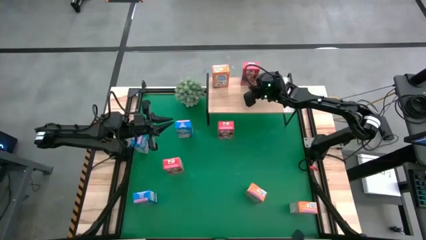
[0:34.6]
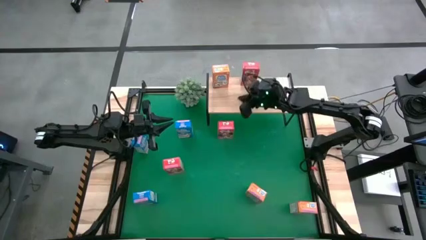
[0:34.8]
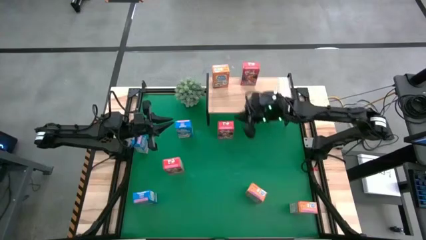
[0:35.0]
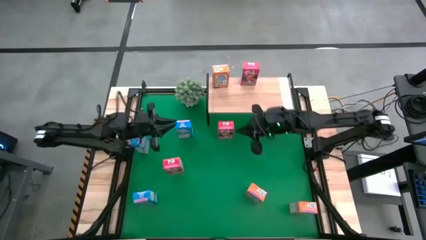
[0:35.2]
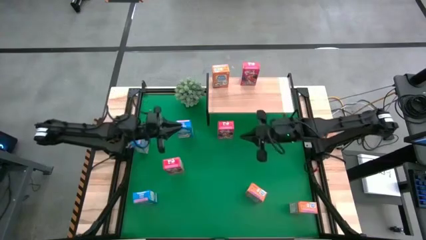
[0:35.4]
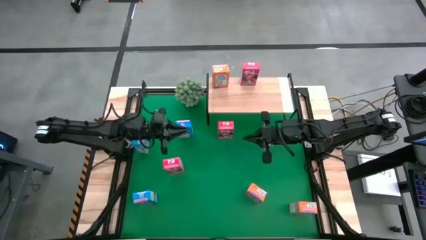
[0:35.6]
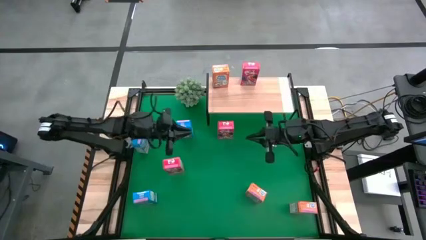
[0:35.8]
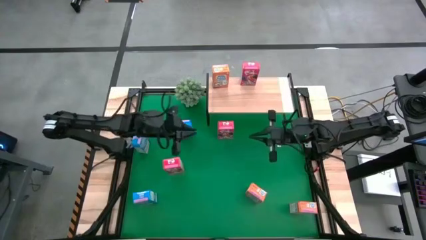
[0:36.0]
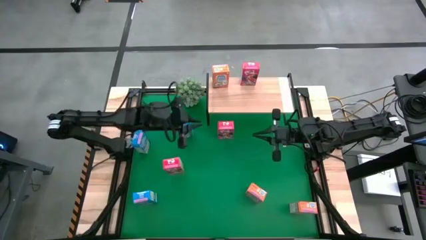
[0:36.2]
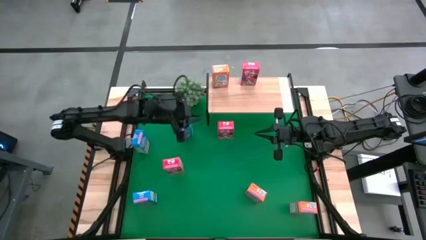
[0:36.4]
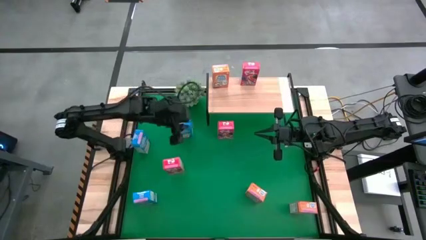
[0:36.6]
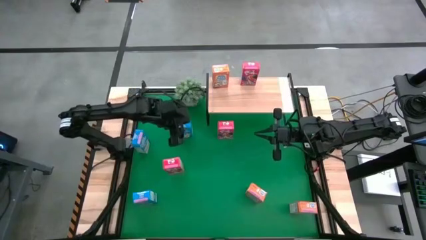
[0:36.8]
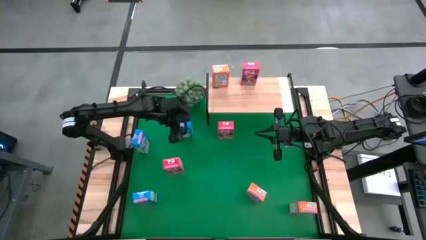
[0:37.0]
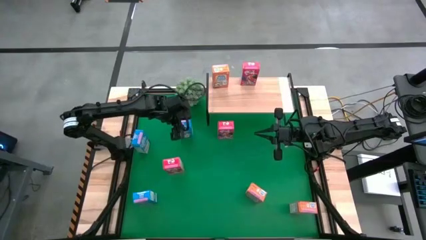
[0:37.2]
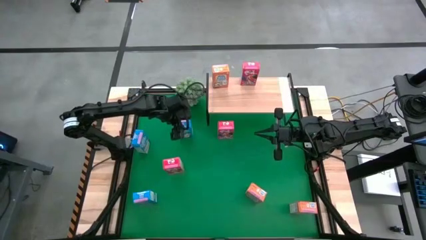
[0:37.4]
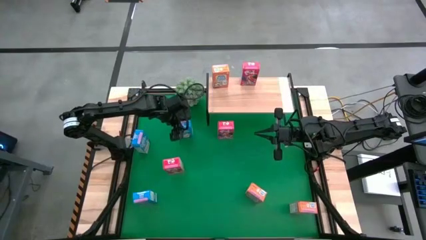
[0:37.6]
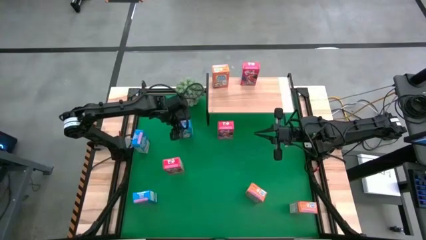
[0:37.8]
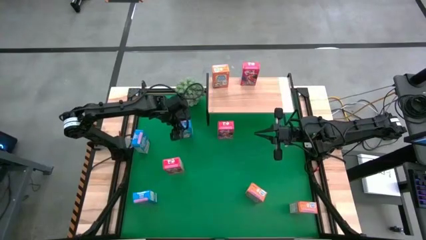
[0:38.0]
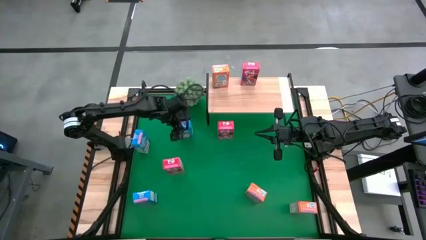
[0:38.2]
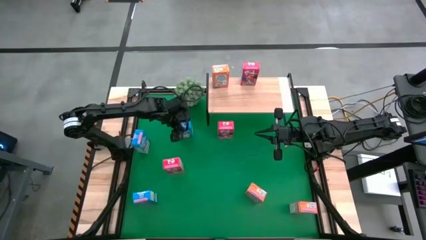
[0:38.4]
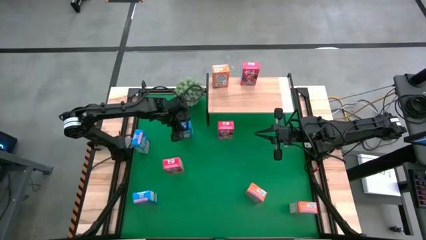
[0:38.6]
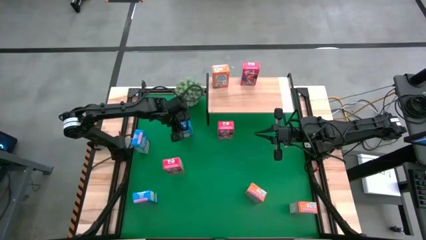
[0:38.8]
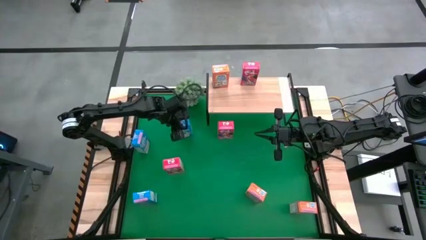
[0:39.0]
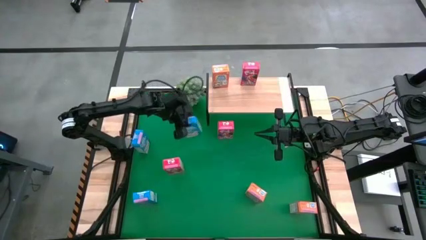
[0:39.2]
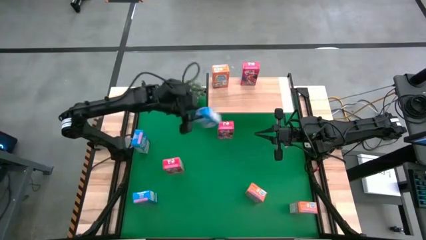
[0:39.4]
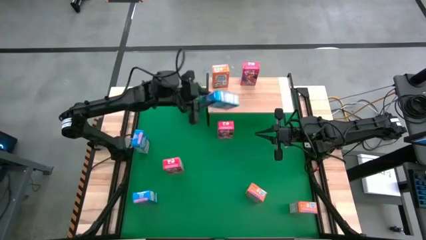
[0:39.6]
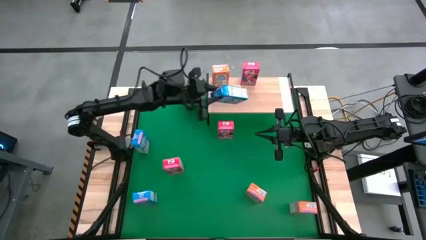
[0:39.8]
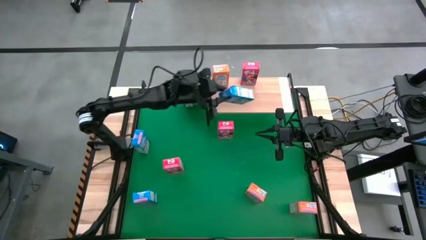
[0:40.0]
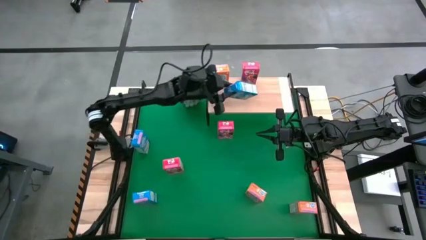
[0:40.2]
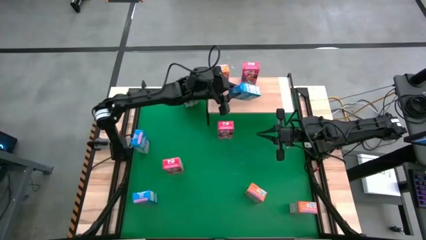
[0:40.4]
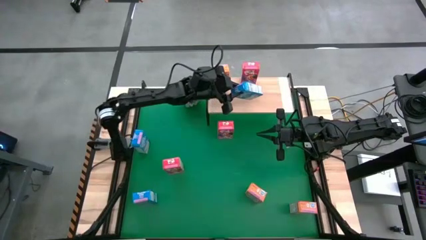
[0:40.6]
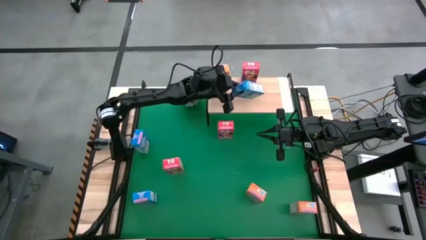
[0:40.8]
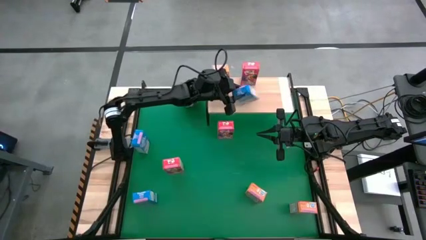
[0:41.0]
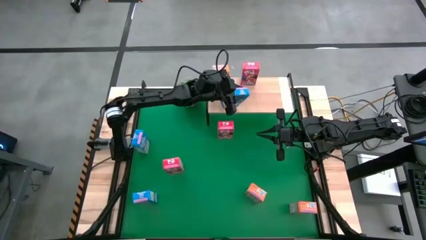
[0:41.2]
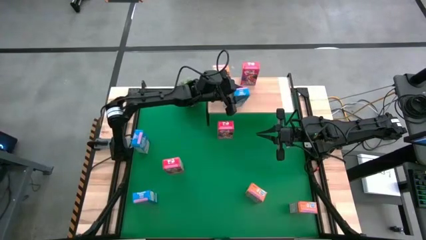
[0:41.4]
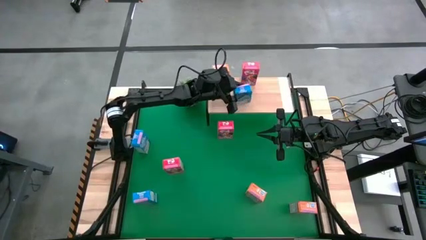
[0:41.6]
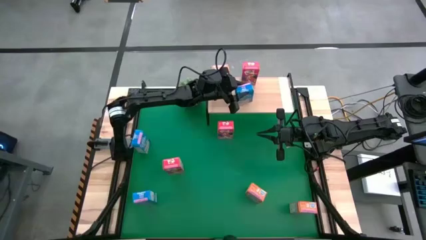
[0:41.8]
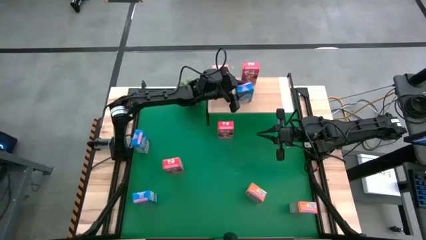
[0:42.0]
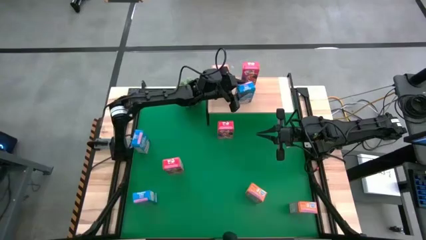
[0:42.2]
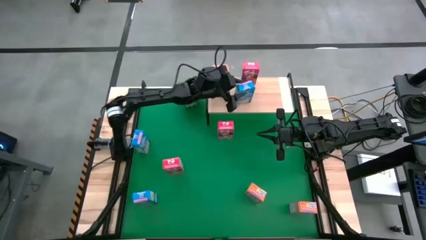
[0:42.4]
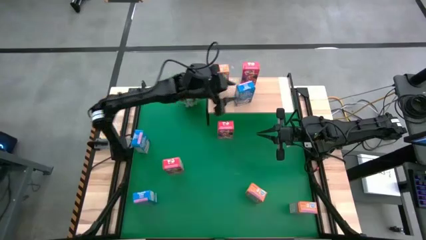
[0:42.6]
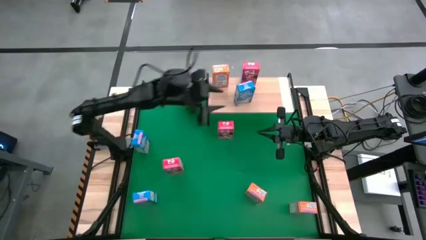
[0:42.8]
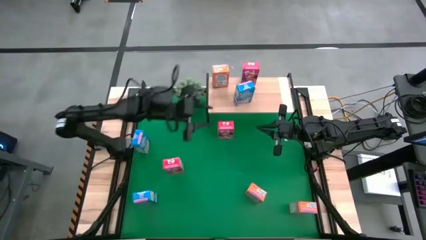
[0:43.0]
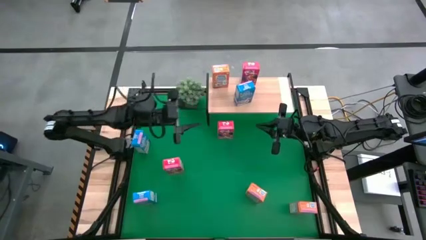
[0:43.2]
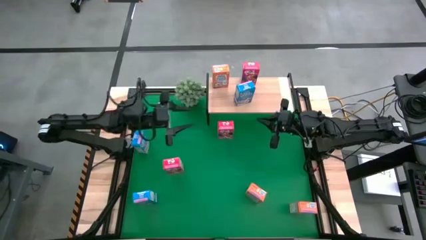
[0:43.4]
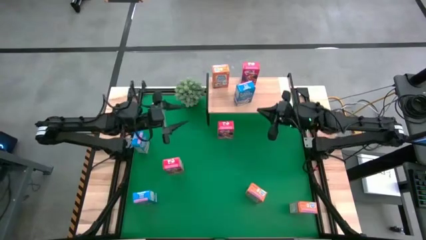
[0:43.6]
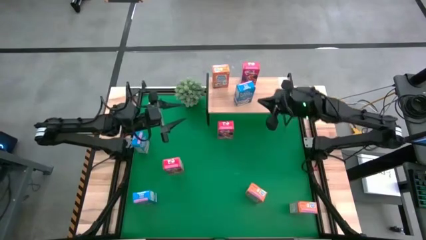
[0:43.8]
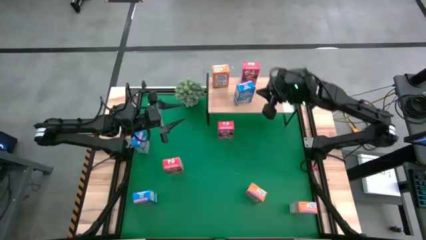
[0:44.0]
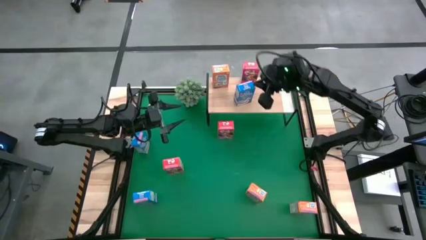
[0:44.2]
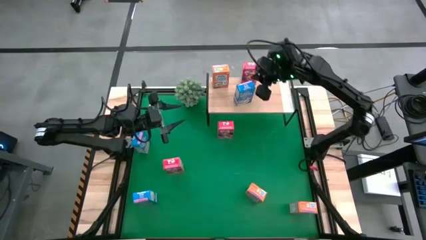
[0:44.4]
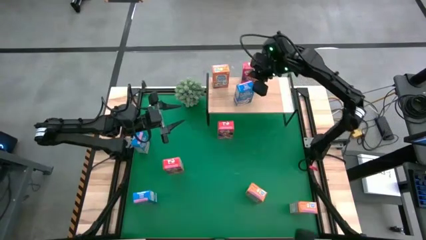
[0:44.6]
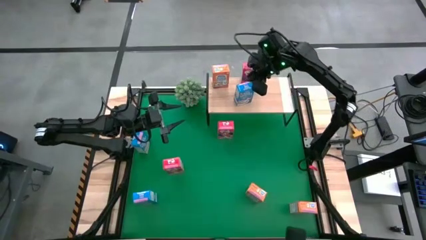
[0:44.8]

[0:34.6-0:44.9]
Task: Stack cereal on shelf
Put the right blue cereal box on the shelf
